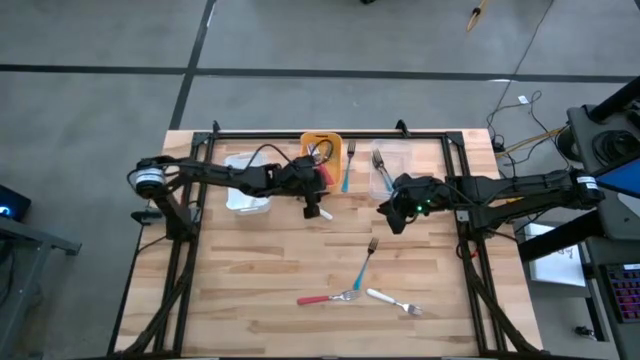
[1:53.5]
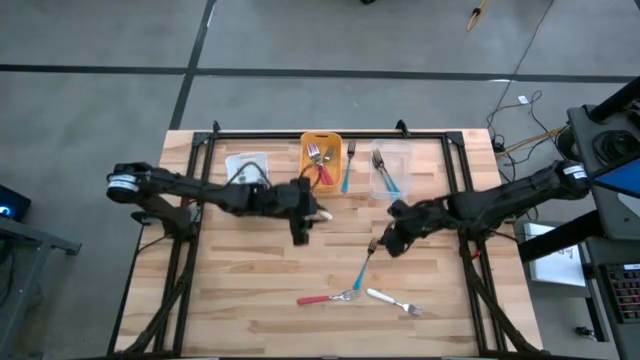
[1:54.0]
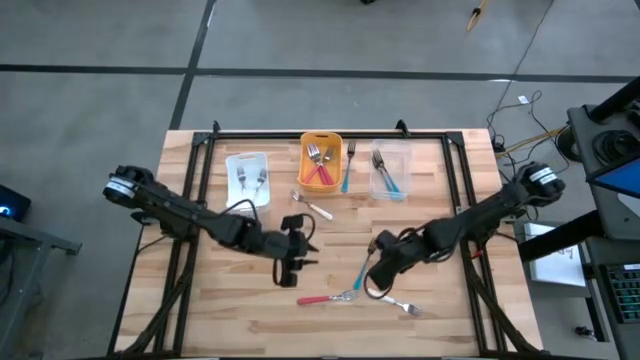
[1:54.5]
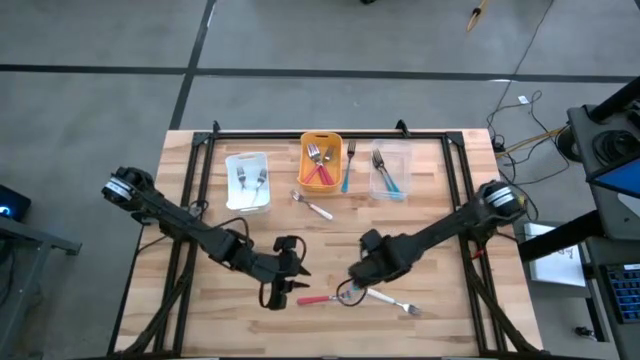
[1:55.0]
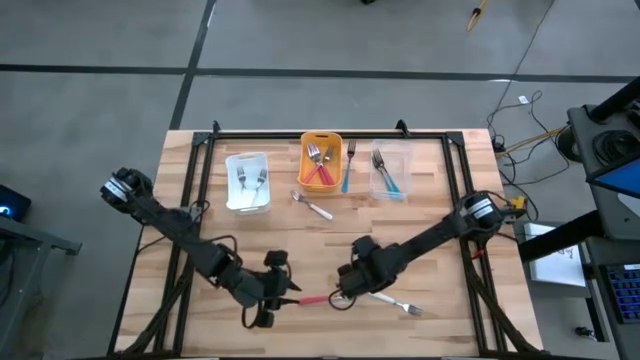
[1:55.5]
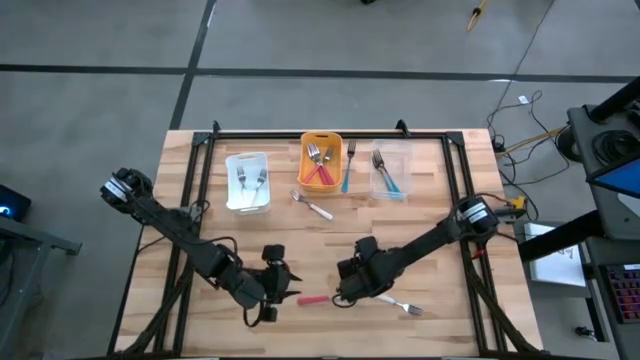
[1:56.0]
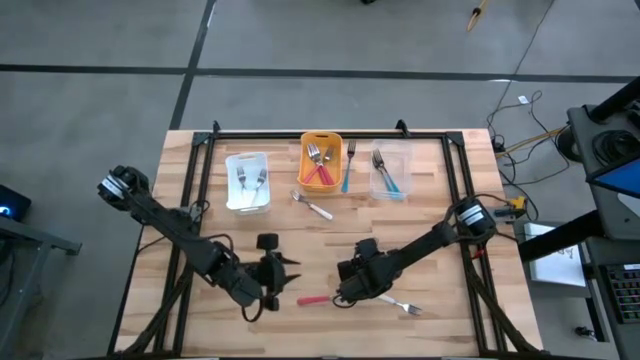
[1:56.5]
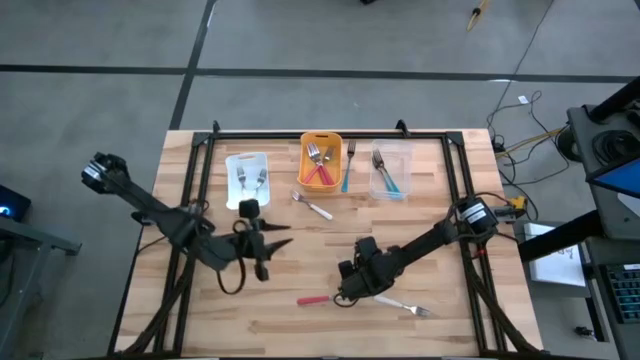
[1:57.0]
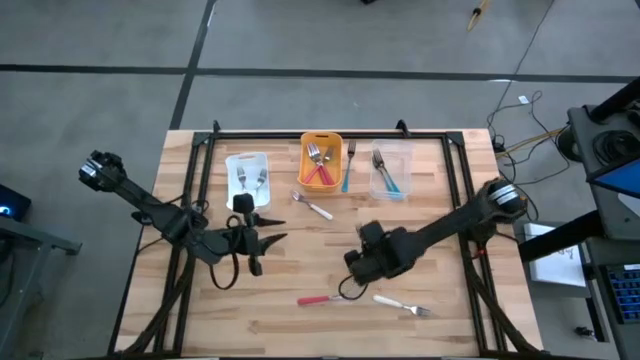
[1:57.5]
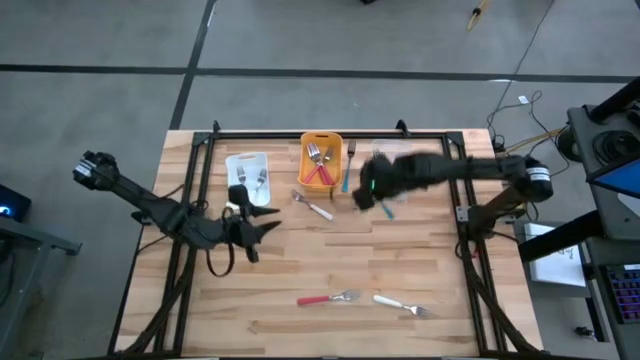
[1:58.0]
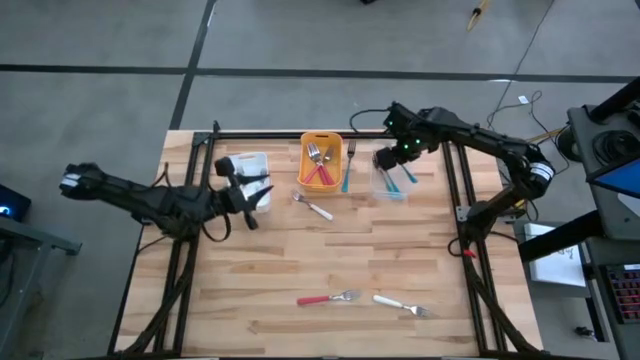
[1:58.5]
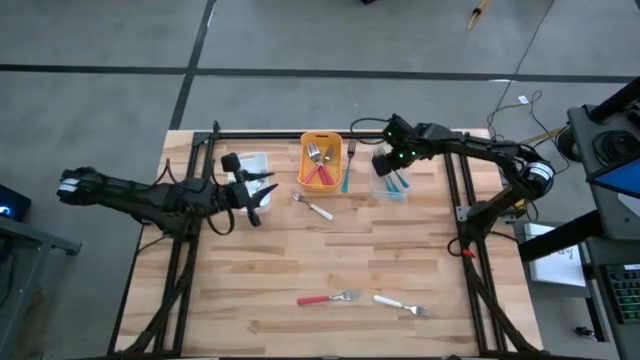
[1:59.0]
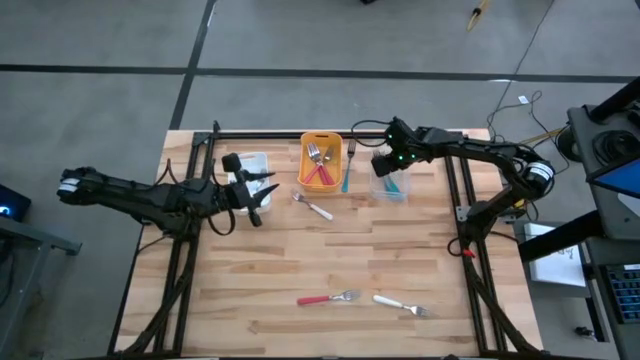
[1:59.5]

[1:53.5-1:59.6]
Task: Sort silverware by color (type)
Put the blue fork into the transparent bin

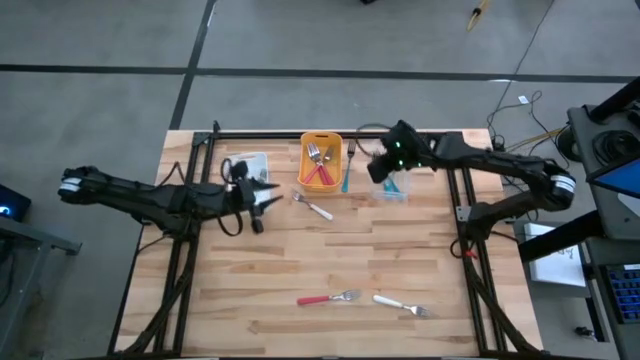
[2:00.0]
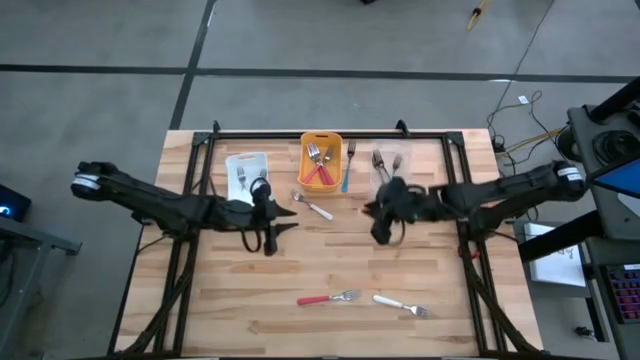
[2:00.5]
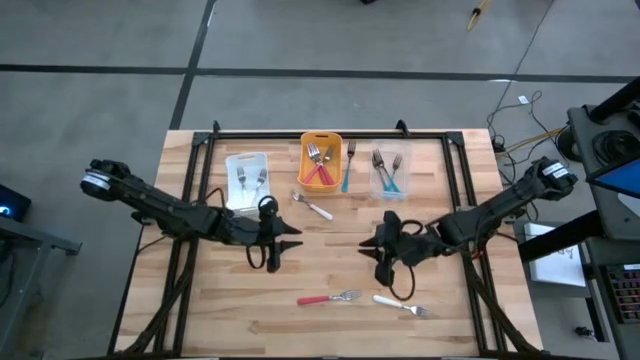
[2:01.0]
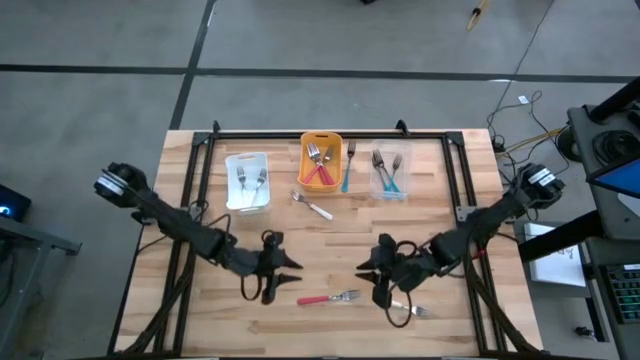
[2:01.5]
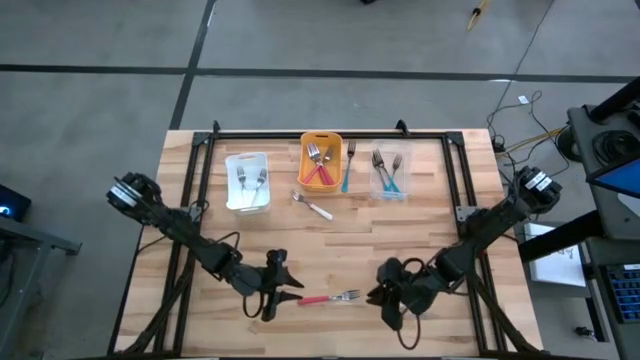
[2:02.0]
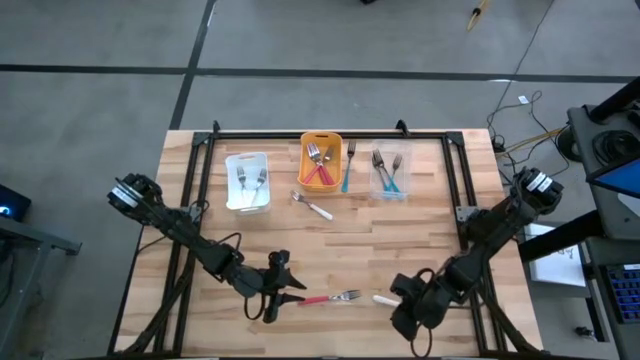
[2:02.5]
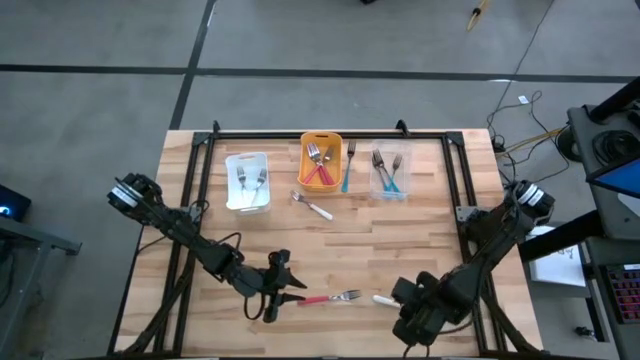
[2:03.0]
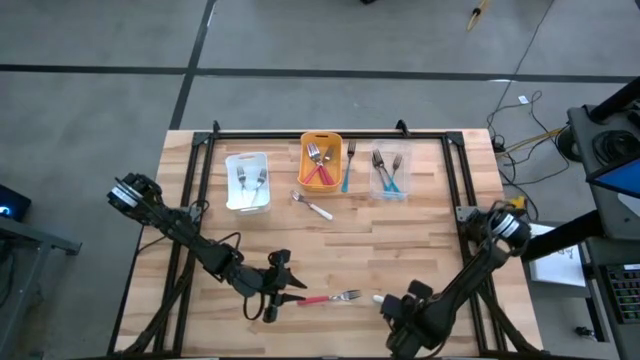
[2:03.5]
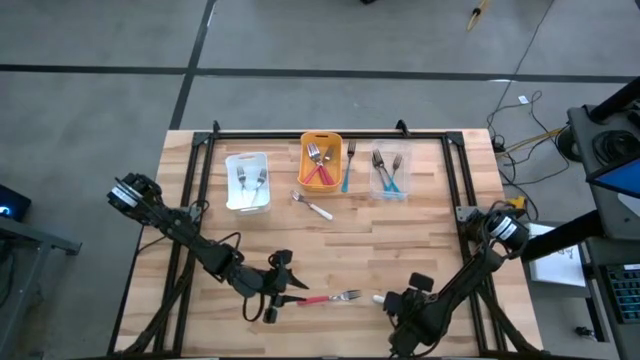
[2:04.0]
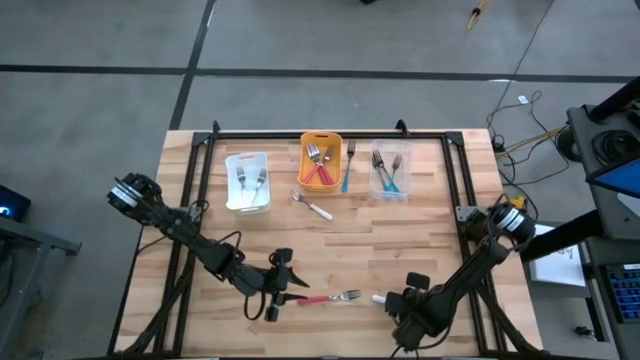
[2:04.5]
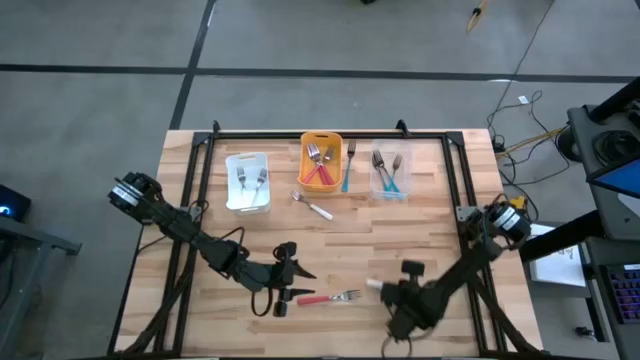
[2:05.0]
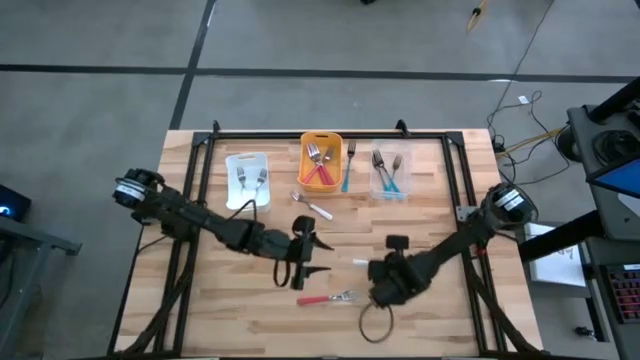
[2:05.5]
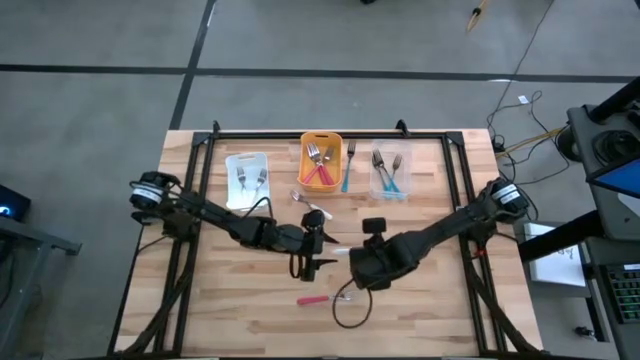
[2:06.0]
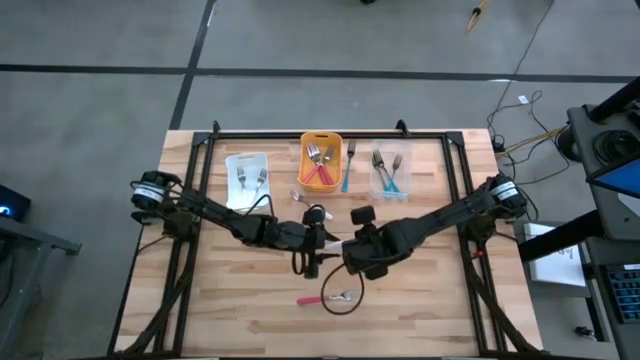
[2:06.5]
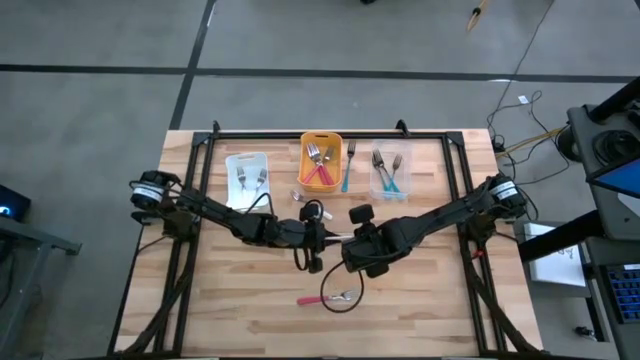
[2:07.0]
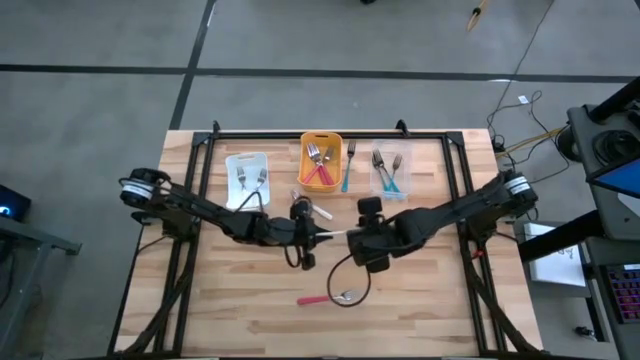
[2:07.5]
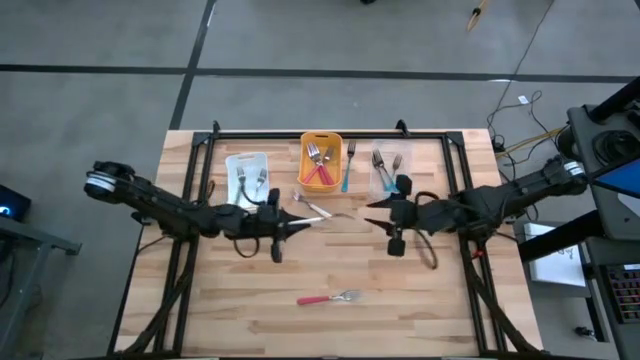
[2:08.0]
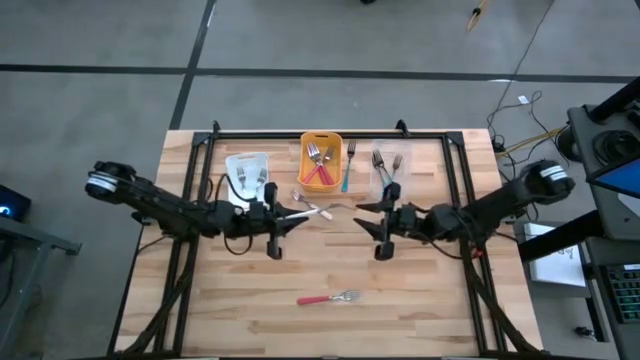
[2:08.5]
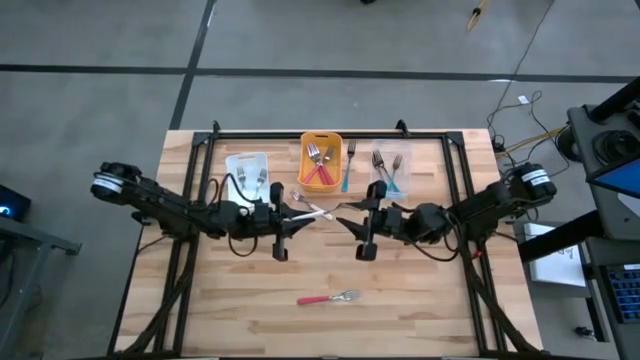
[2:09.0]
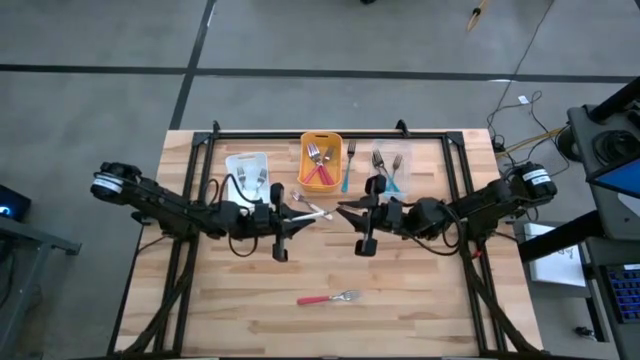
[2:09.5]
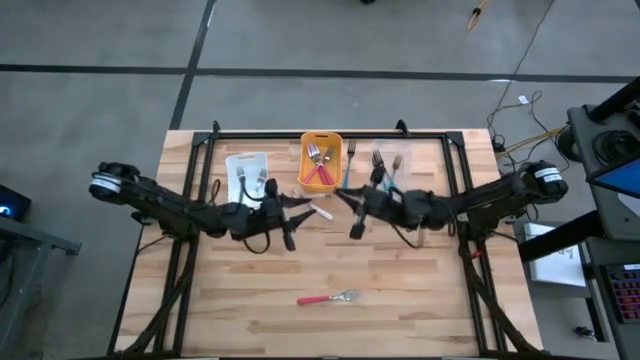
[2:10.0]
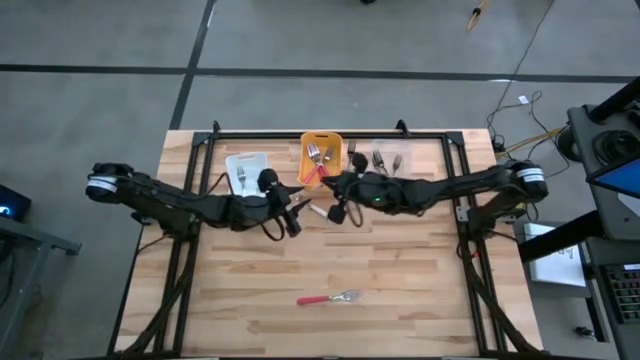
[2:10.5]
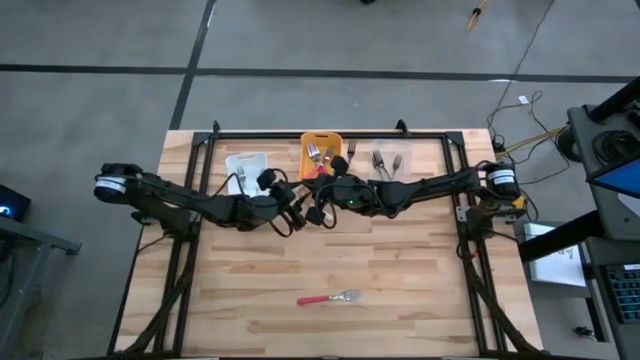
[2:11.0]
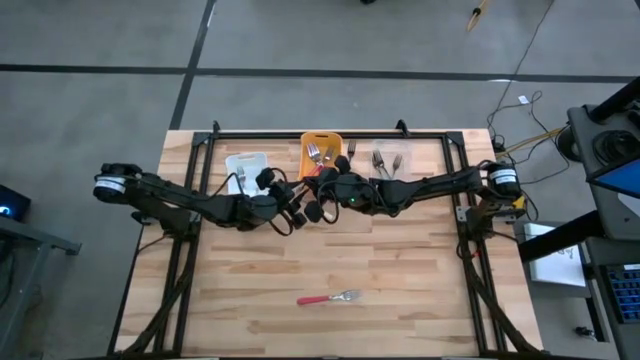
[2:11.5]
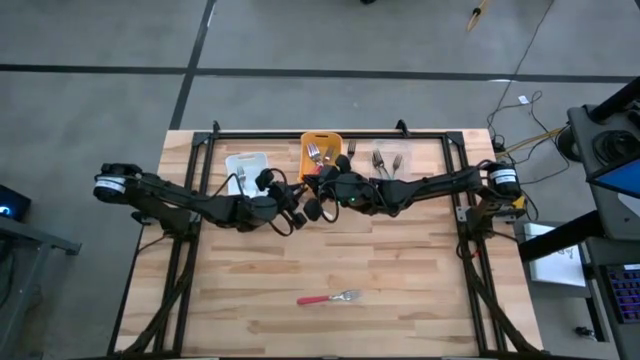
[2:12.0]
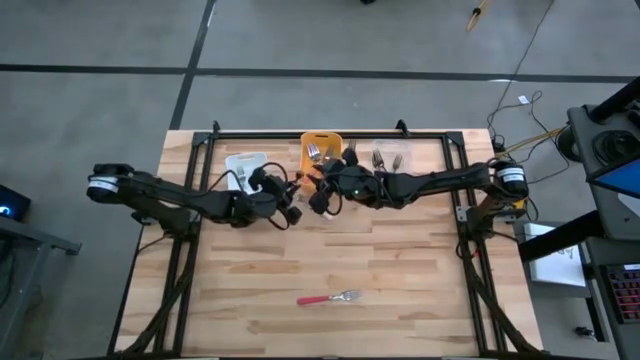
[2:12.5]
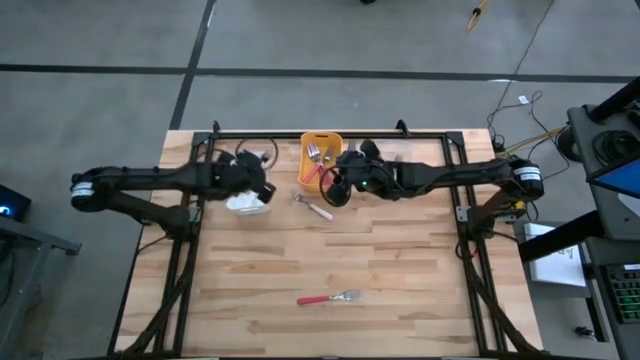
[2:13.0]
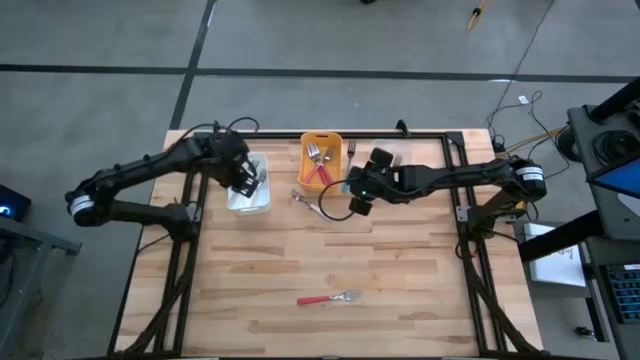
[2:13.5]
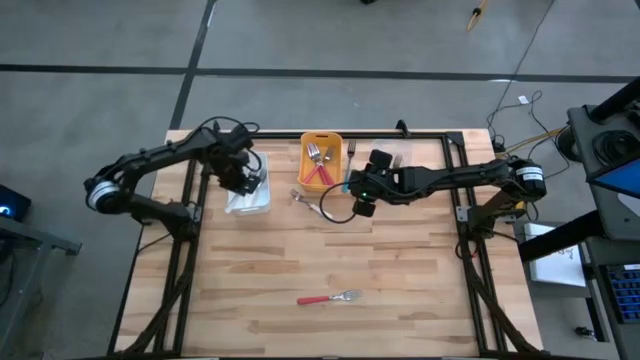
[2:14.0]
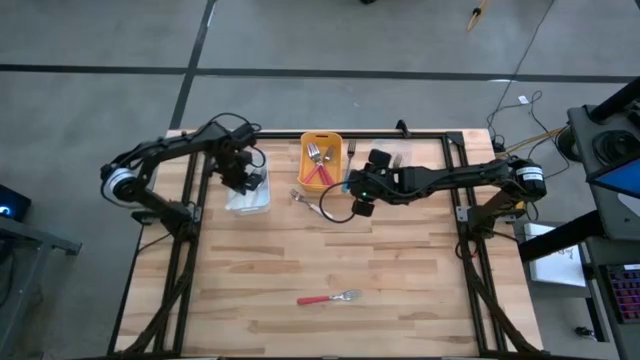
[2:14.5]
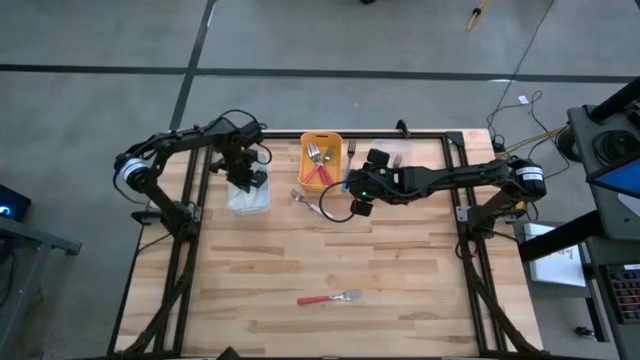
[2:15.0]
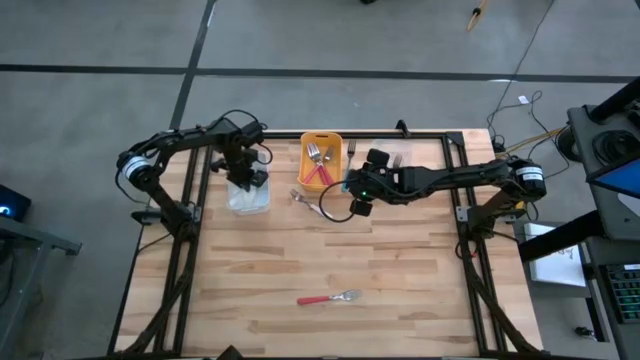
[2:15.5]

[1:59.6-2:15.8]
Put the white fork into the white bin
